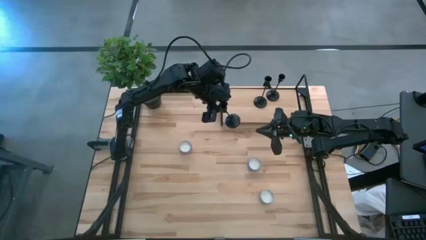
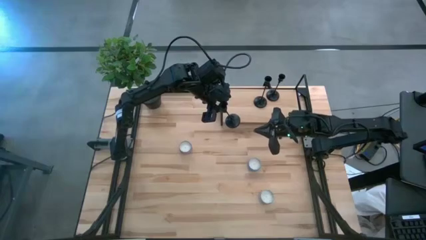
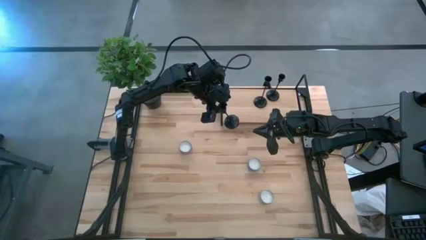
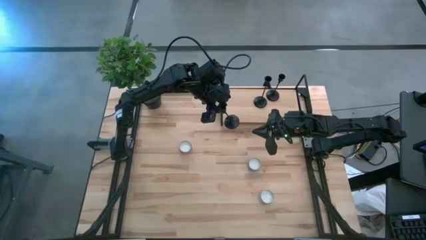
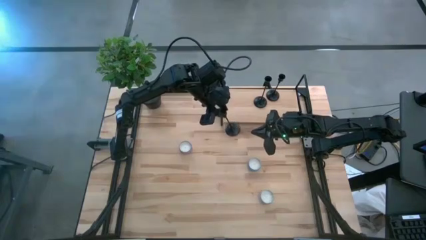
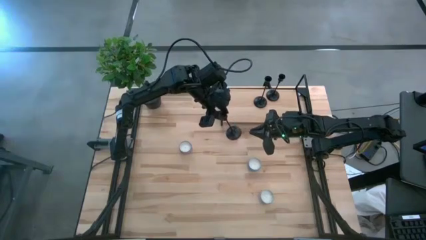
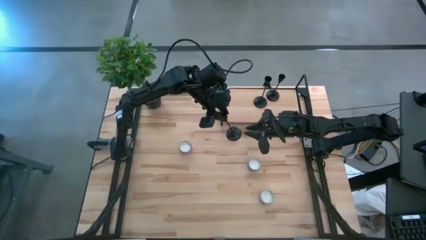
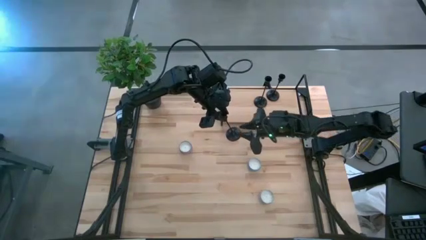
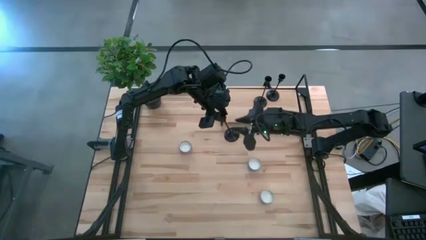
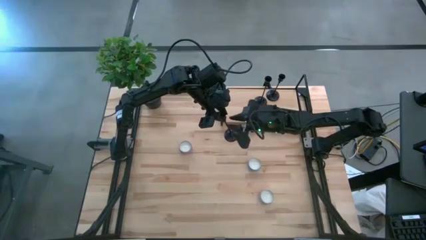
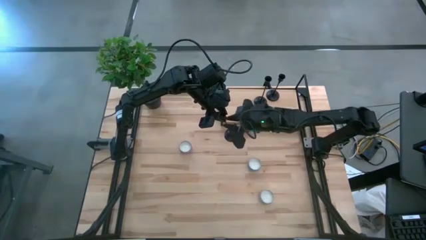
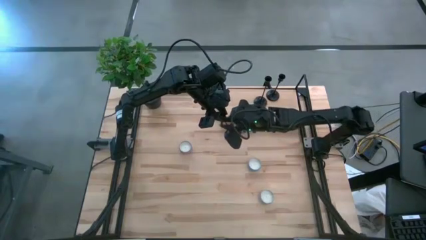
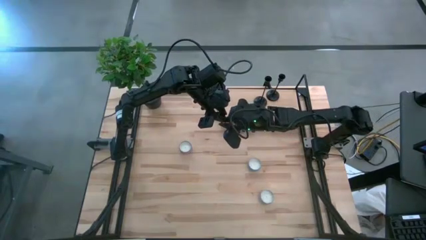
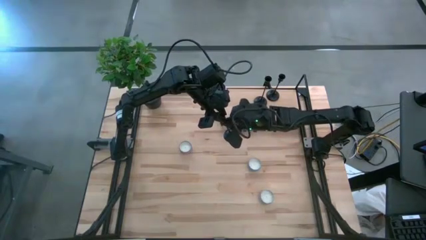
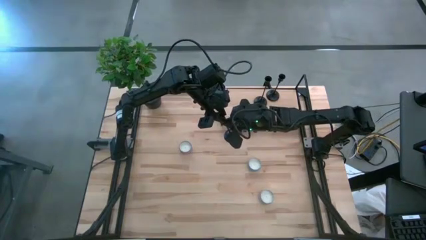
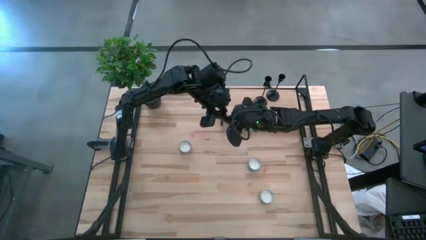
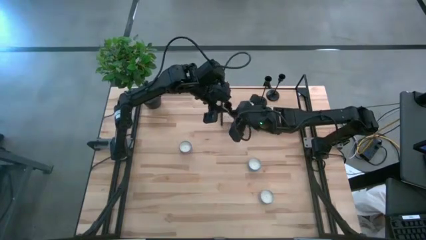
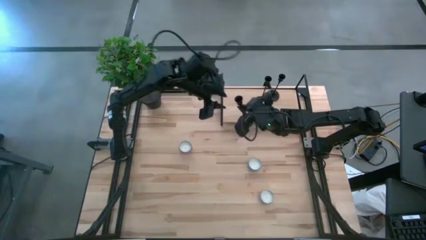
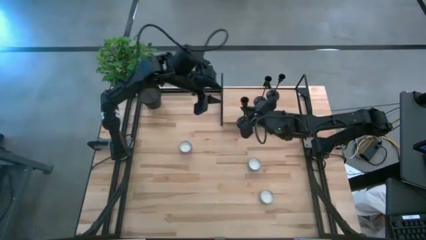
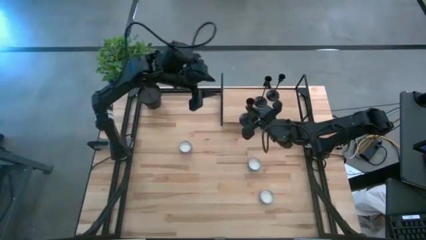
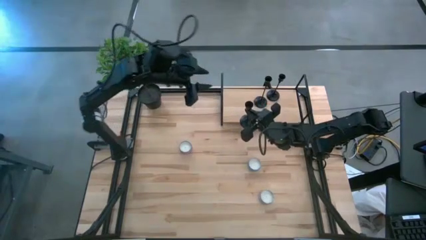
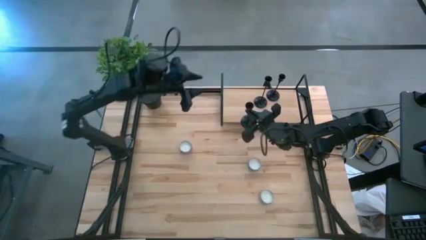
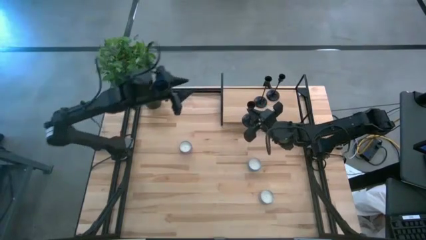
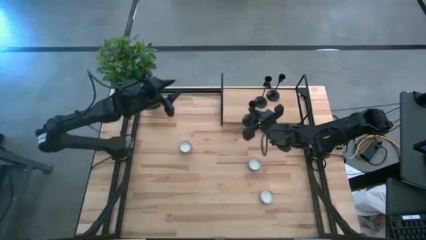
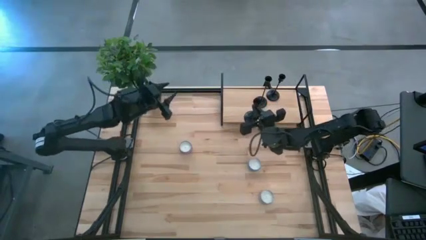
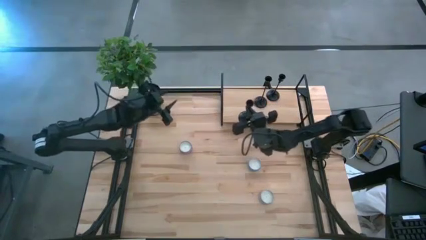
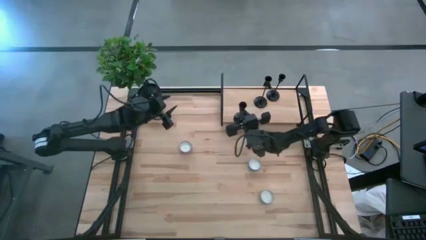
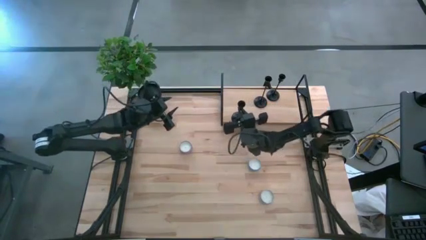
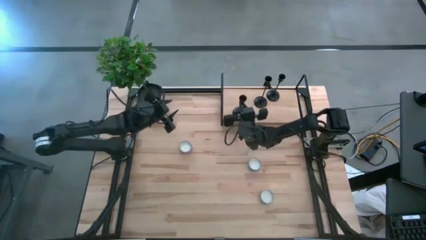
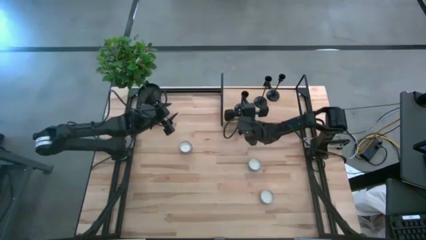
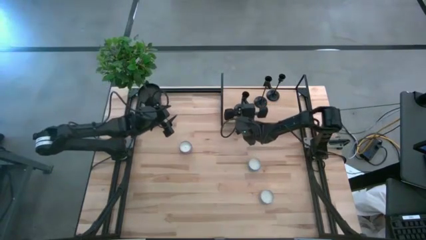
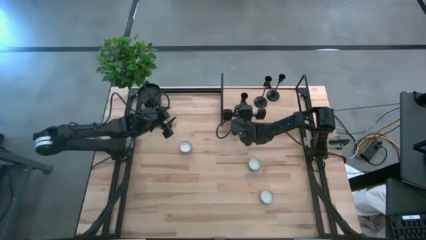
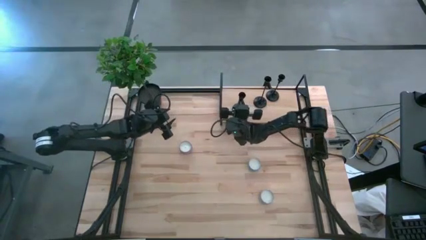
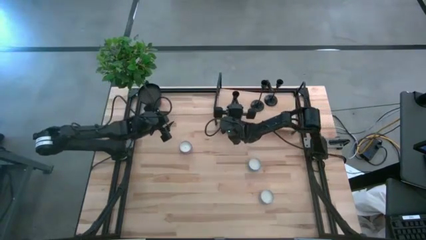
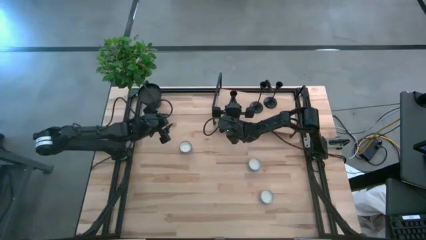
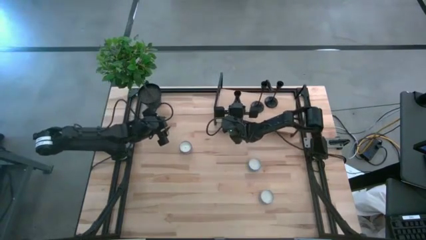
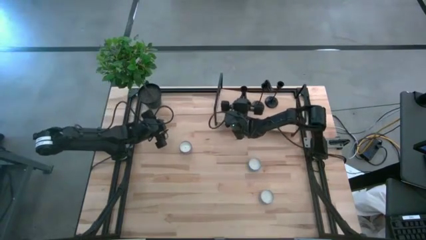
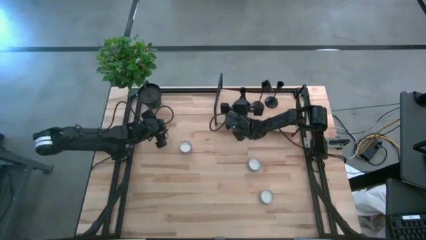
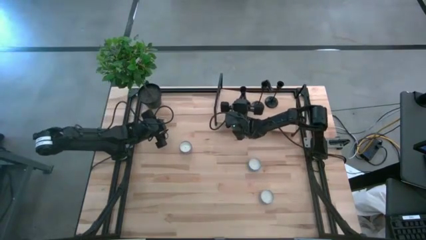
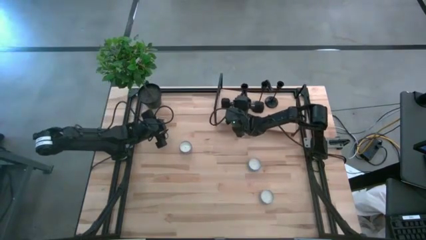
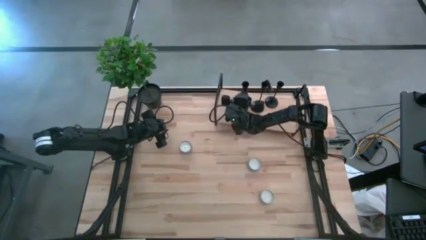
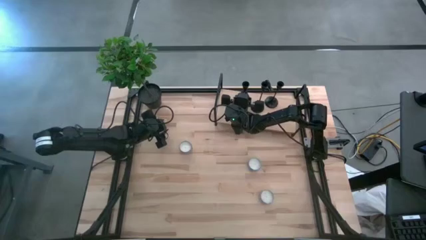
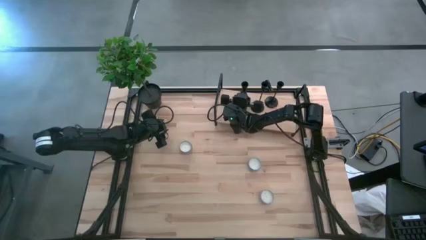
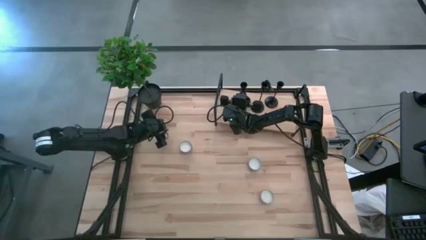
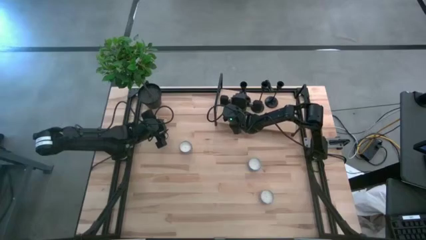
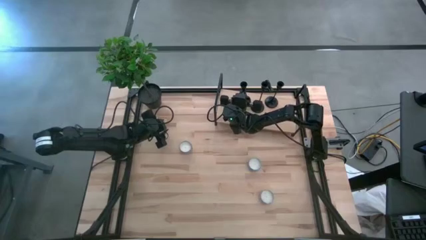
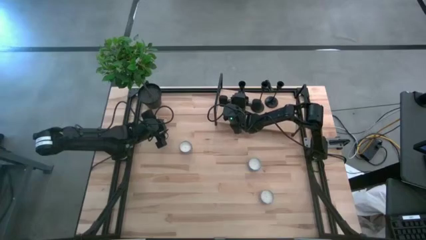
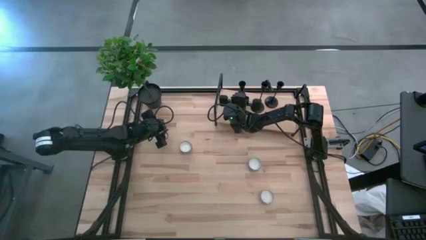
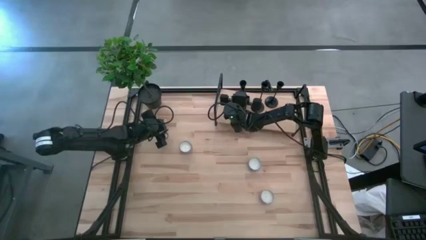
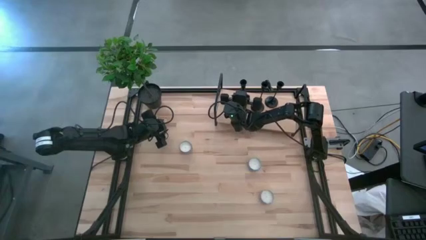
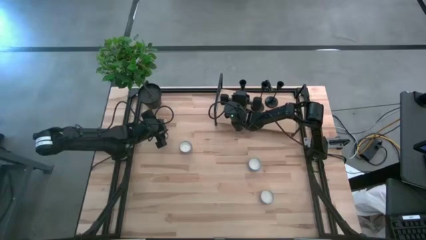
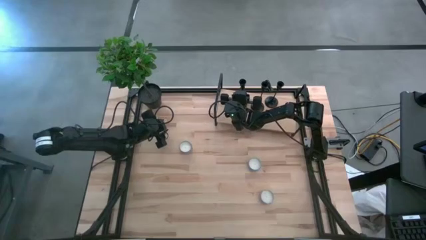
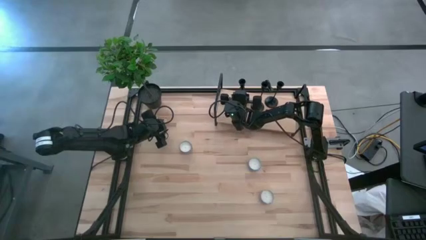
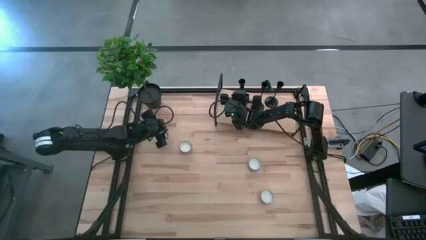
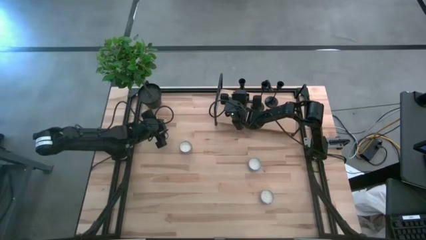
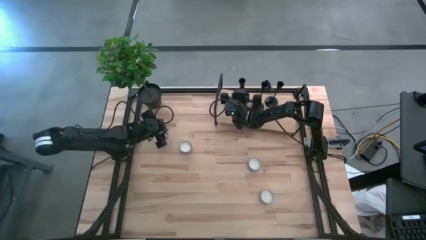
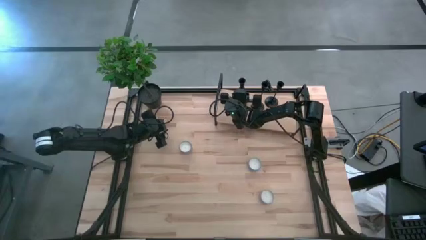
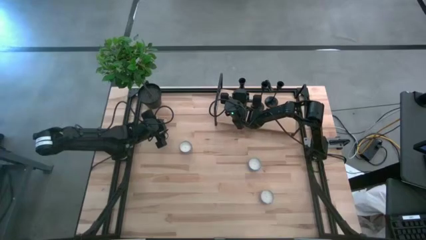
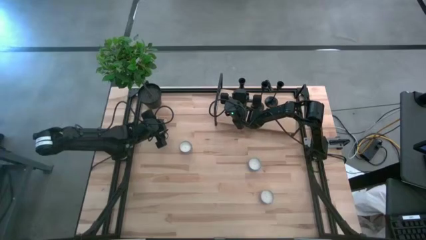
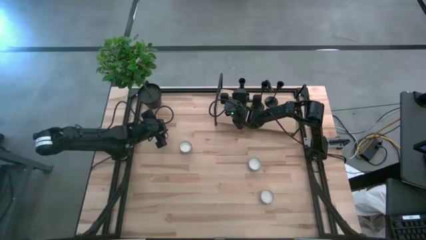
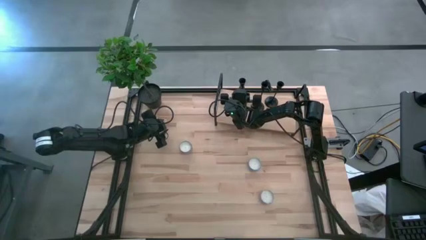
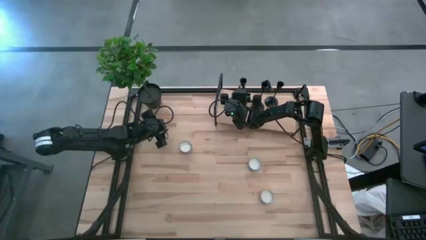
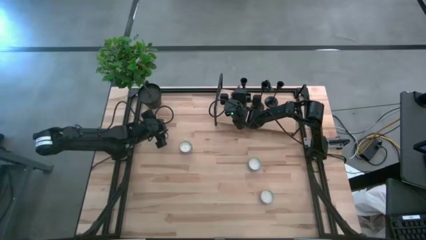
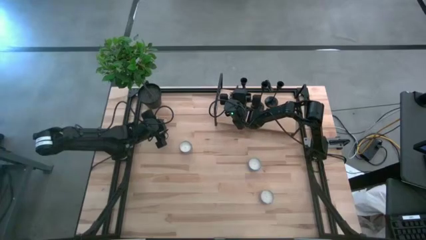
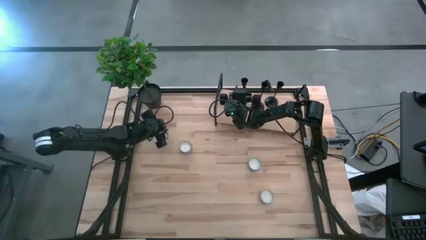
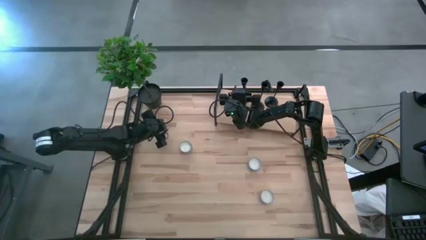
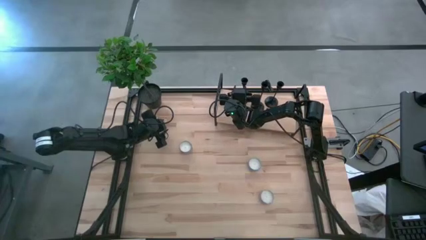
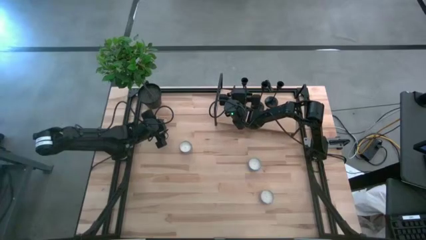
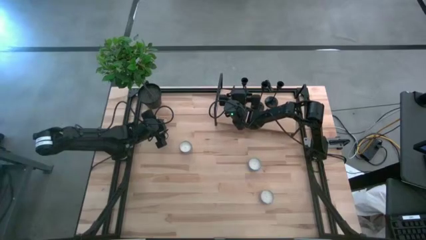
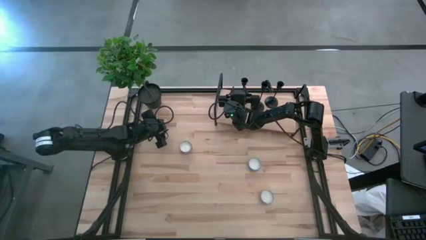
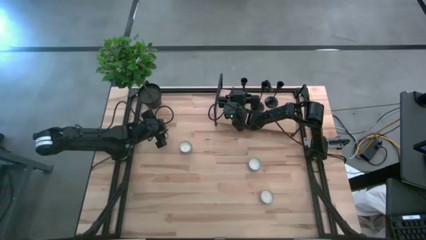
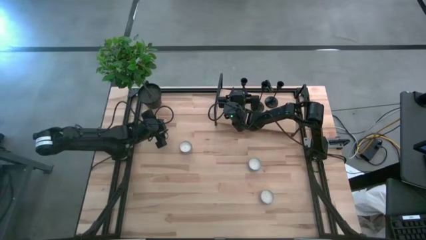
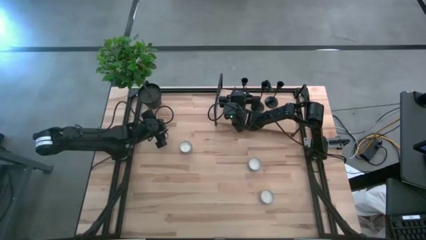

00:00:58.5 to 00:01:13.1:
Task: Pick & Place candle stick holders
Put the black candle holder on the shelf
